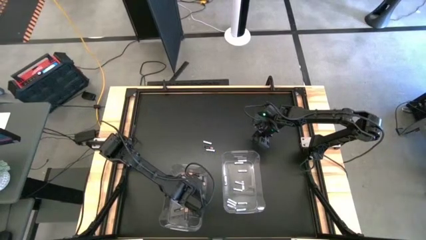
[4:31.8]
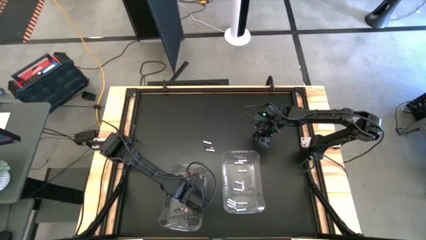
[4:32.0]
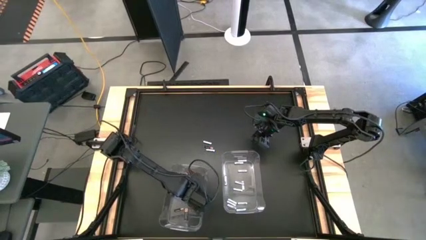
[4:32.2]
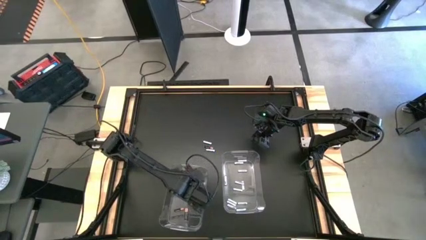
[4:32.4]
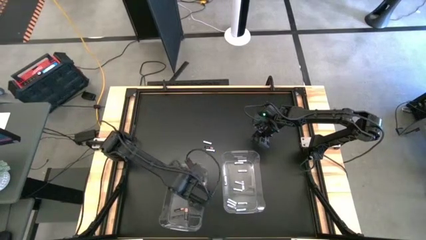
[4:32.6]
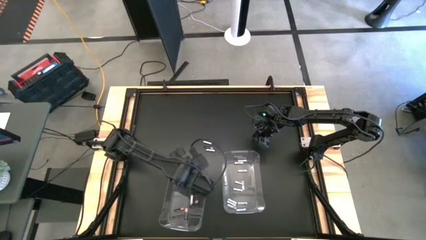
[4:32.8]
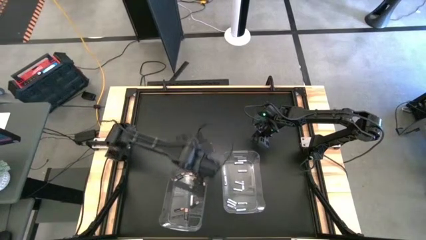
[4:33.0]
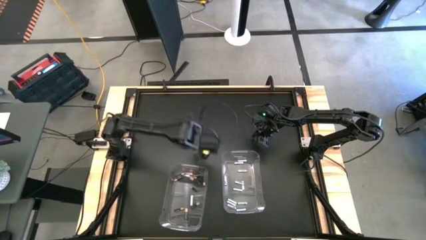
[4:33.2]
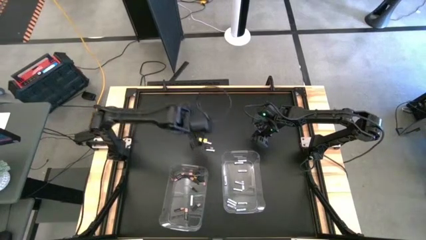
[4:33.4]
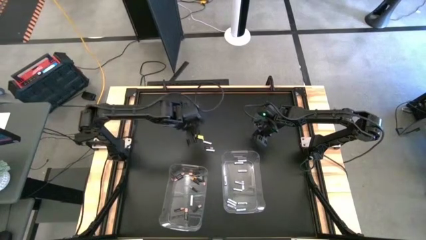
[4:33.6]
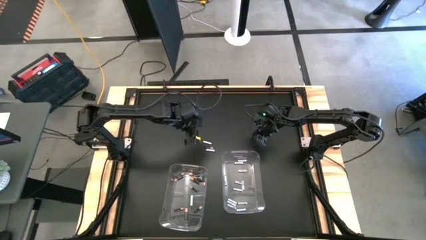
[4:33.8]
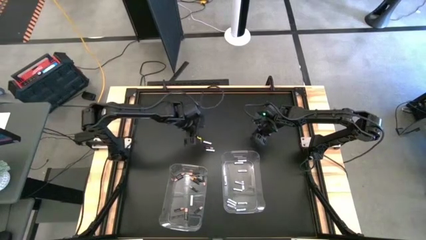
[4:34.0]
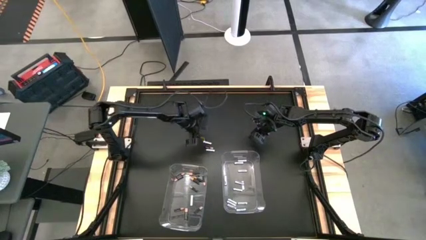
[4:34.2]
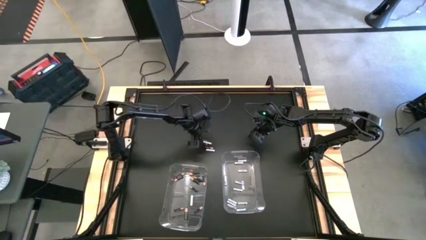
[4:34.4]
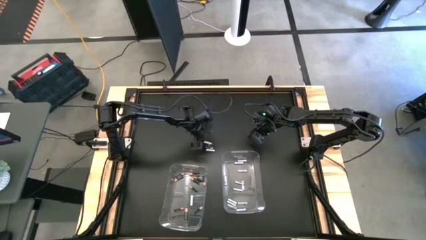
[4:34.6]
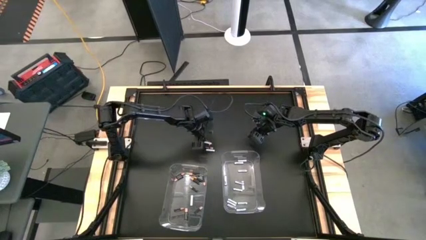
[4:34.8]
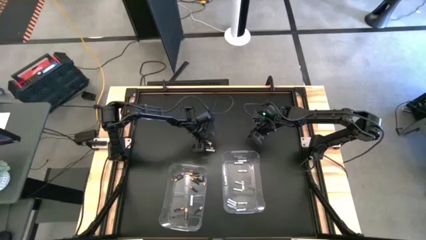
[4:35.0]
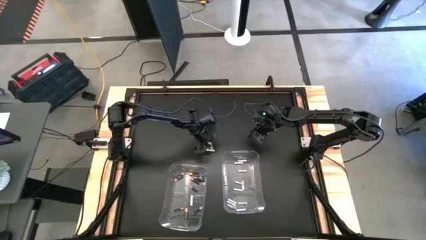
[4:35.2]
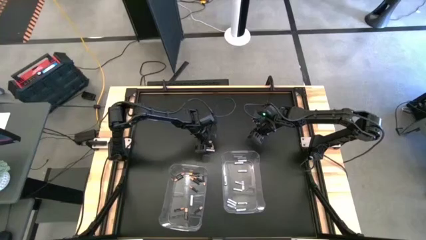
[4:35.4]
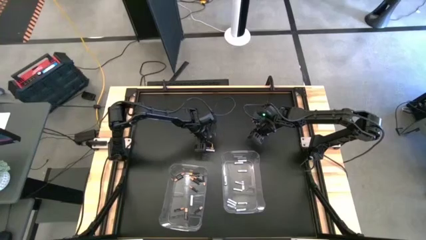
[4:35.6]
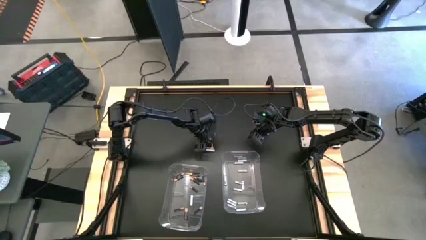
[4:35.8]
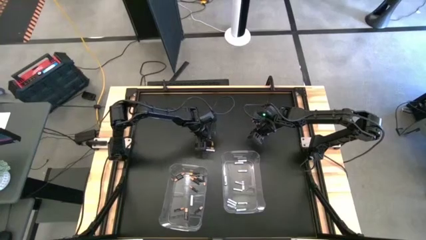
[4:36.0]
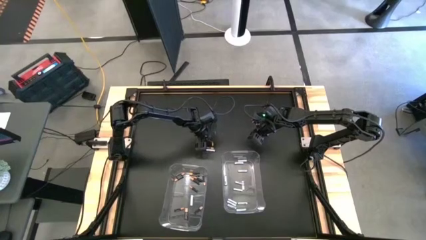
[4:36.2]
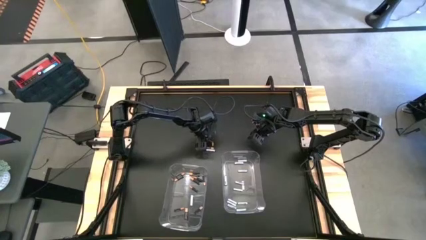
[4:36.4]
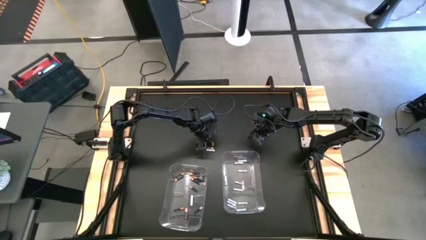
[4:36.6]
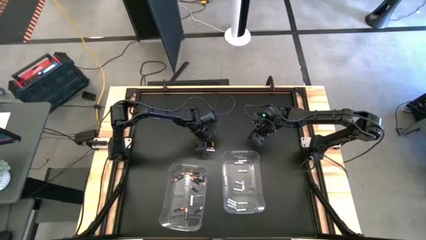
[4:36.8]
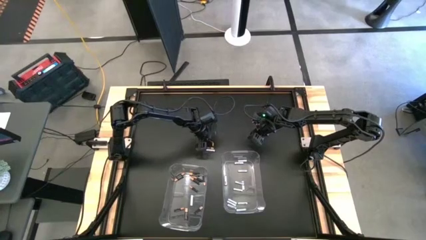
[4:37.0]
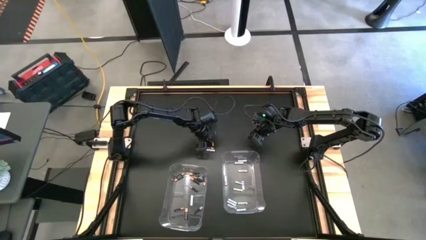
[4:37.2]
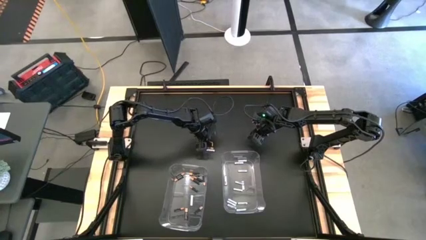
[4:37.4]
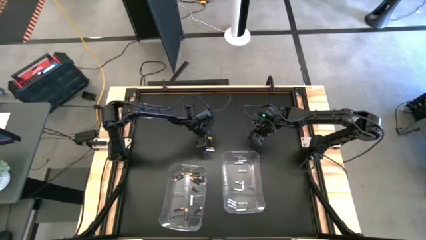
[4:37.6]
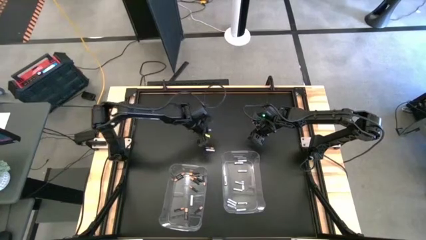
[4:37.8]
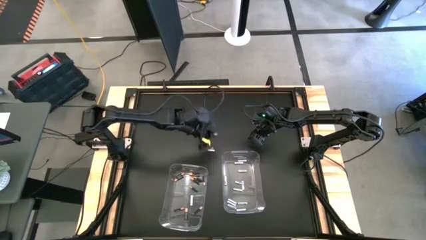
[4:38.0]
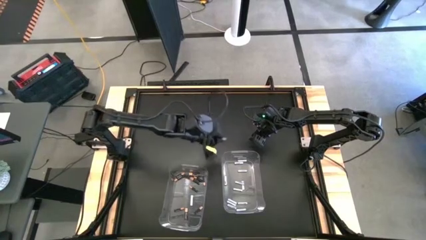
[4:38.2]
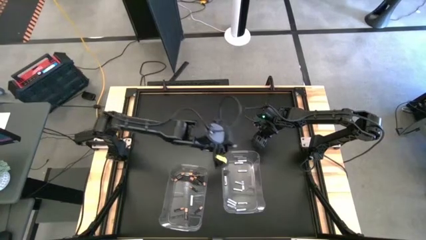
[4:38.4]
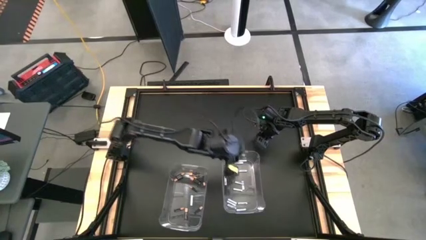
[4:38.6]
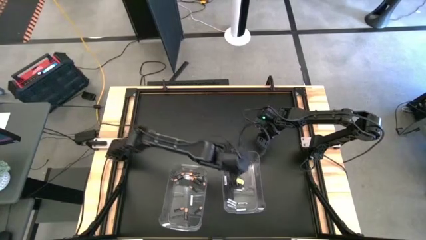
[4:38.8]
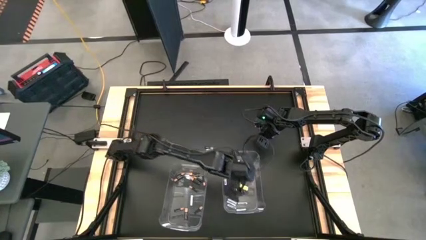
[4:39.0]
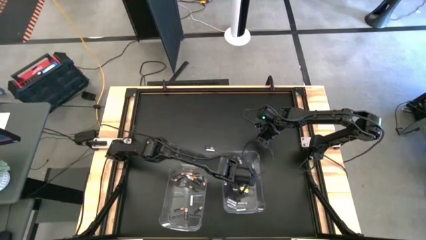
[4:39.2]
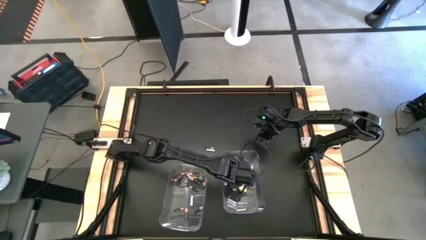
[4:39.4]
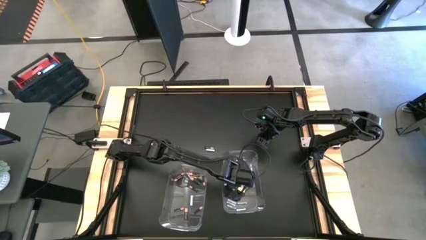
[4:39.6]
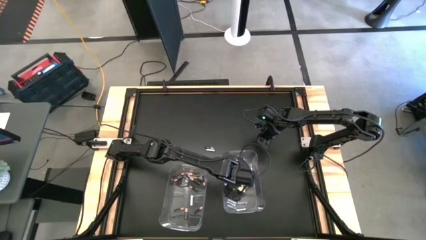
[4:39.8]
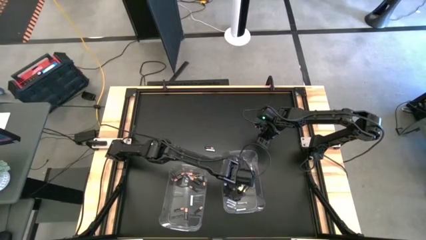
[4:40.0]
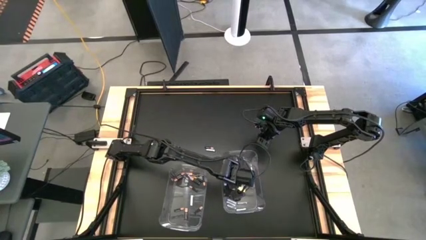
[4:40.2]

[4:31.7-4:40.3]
Task: Sort batteries
Put the white battery into the right transparent bin

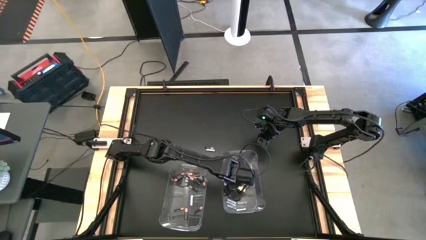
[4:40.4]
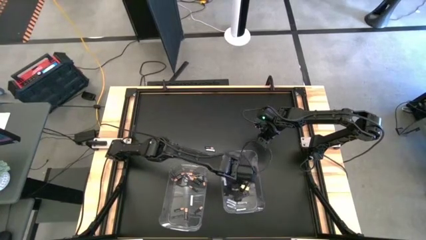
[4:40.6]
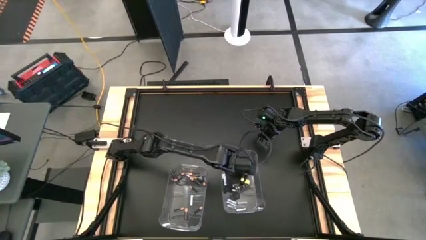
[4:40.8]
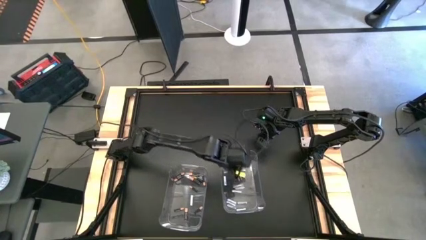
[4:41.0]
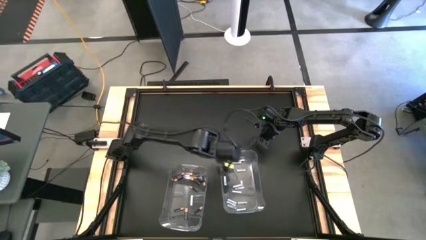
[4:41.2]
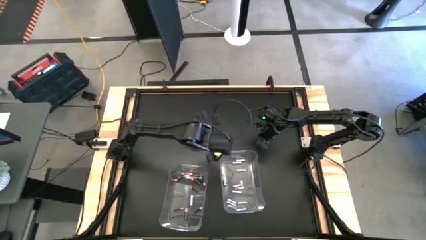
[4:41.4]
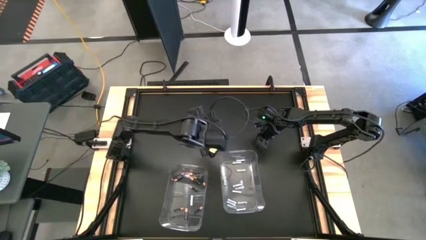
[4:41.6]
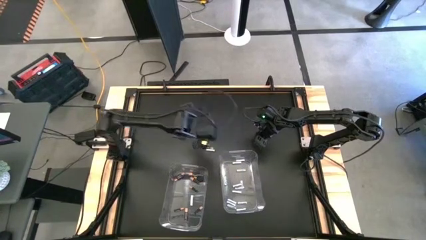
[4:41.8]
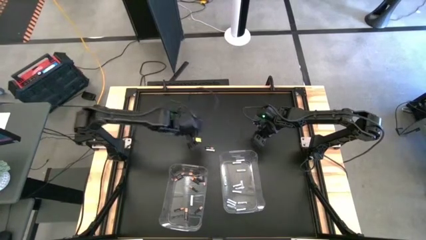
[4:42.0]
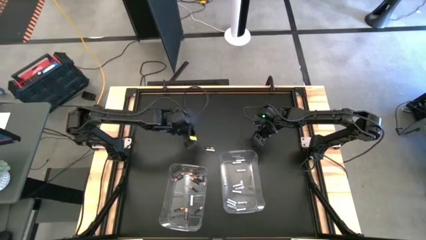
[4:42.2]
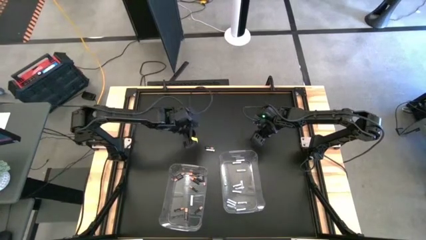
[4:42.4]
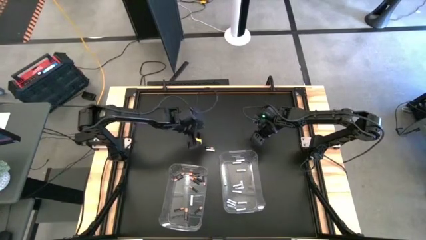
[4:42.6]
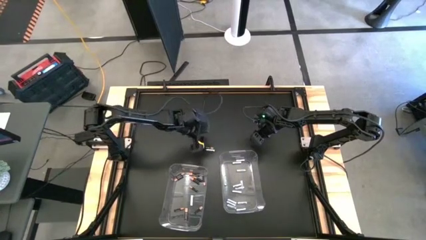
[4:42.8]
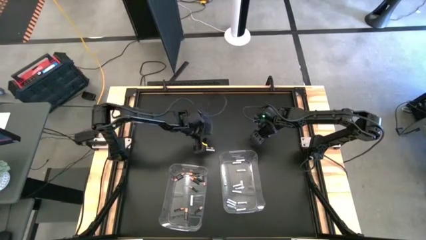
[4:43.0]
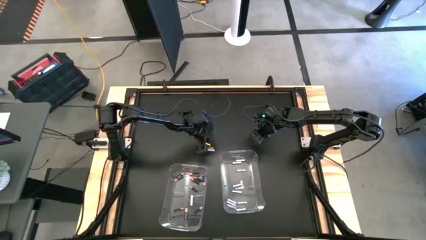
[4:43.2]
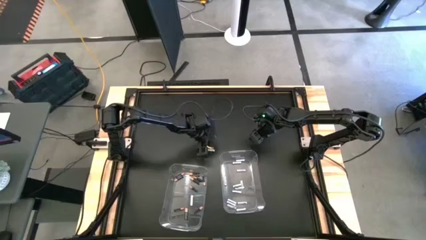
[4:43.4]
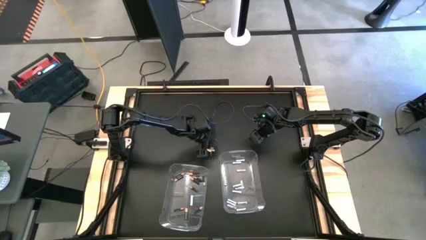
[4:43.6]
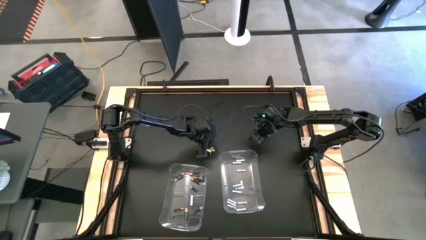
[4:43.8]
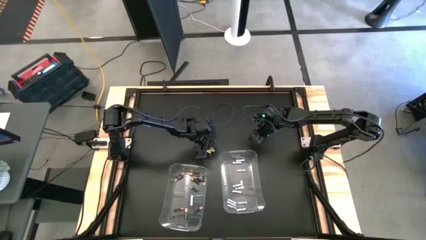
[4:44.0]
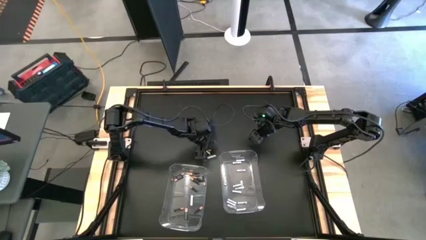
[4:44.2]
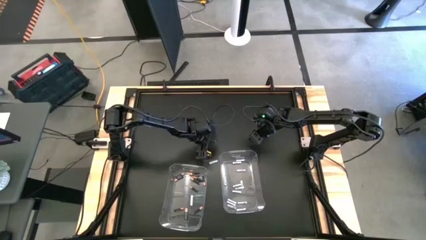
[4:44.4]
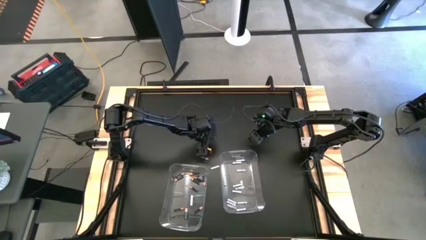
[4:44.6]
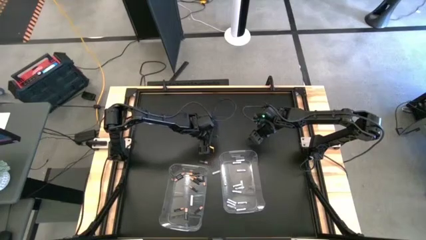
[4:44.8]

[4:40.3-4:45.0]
Put the black battery into the left transparent bin
